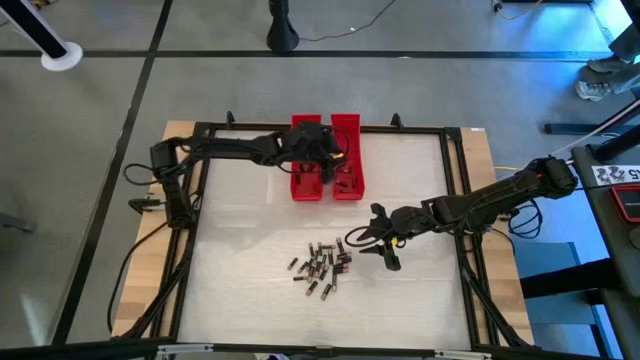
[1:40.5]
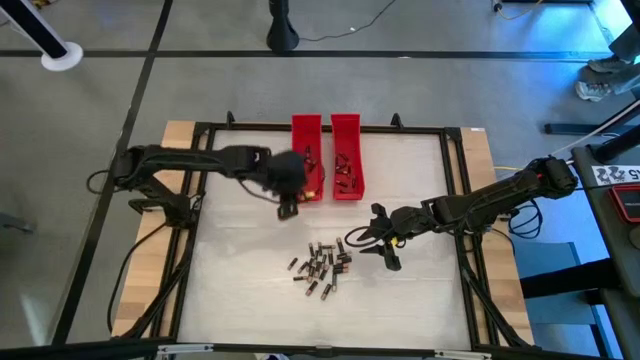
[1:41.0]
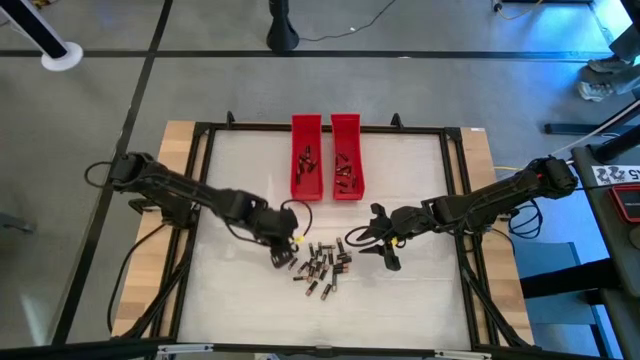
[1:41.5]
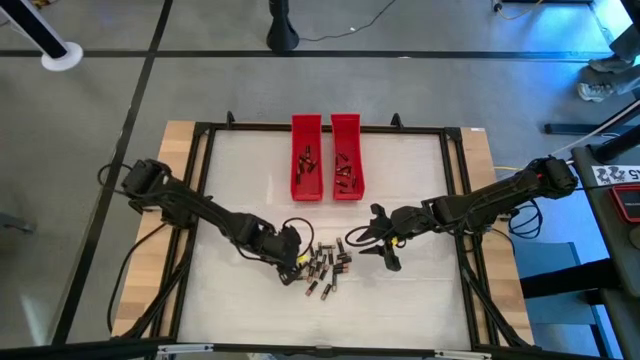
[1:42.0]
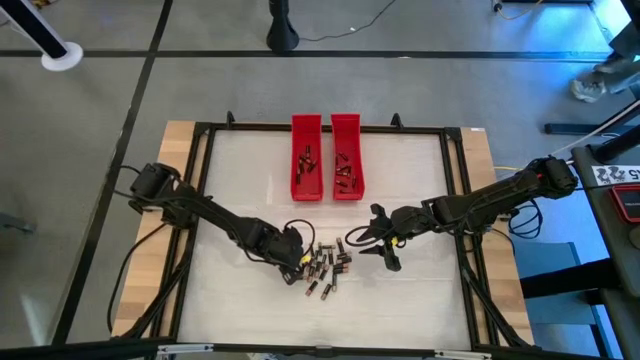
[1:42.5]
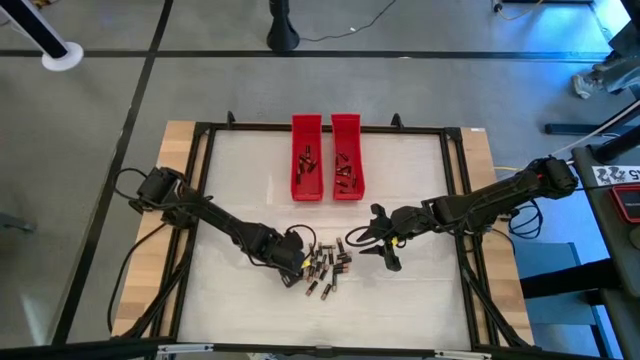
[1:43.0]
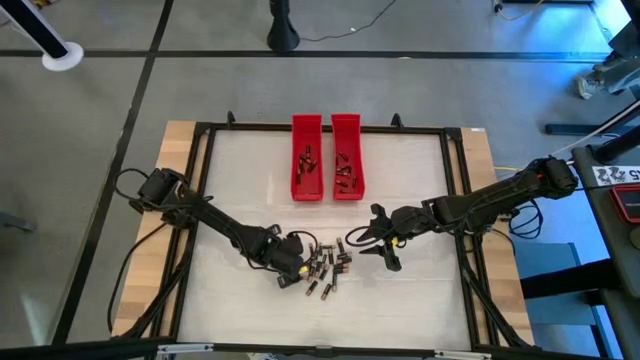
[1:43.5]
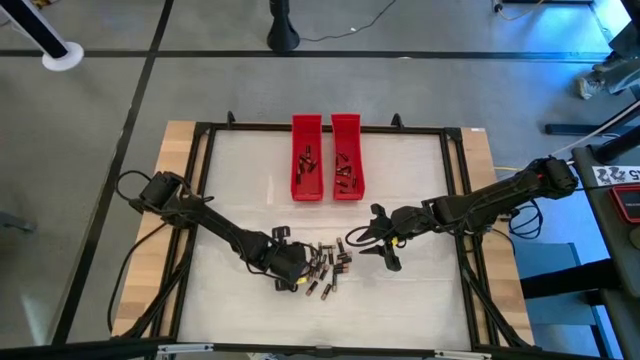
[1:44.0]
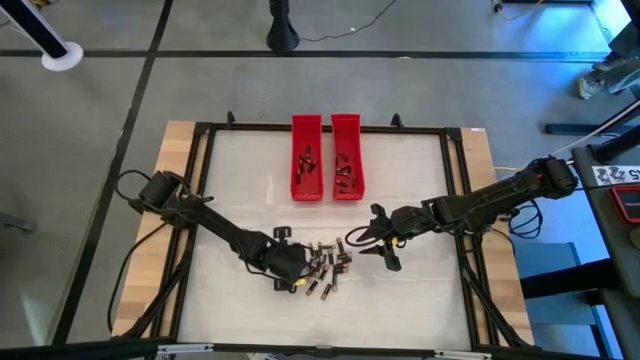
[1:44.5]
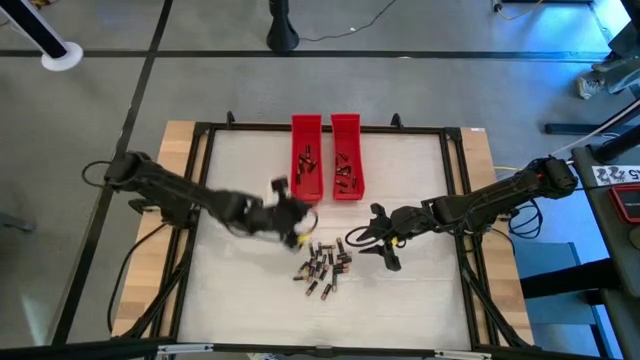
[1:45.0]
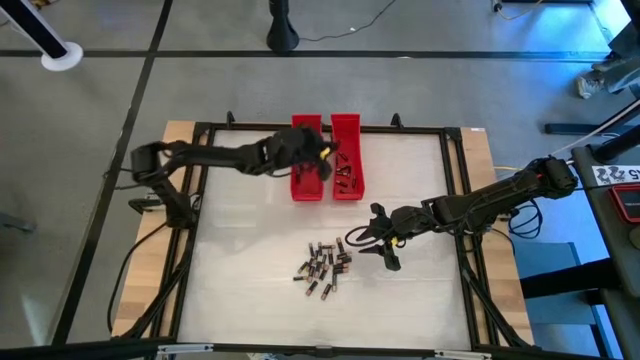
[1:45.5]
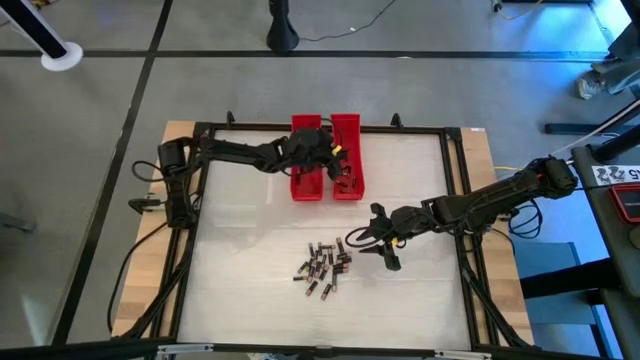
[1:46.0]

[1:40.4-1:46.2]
Task: Sort batteries
Put the small black battery into the right red bin

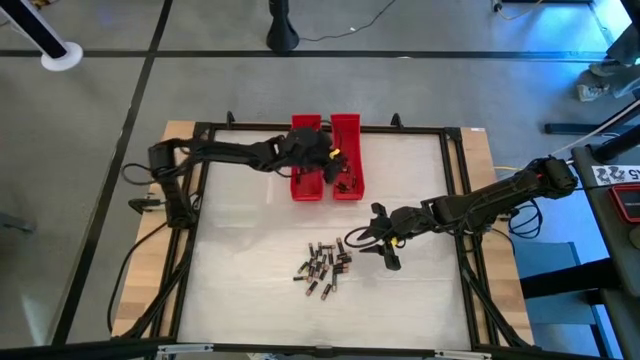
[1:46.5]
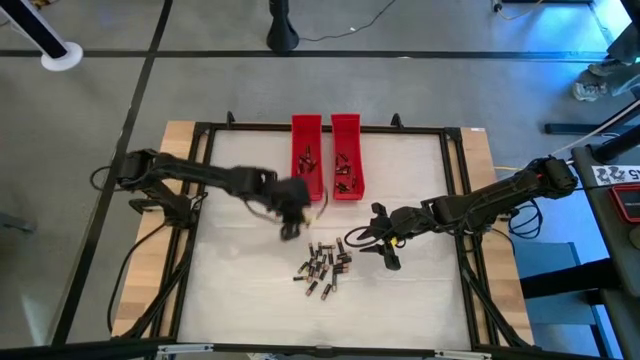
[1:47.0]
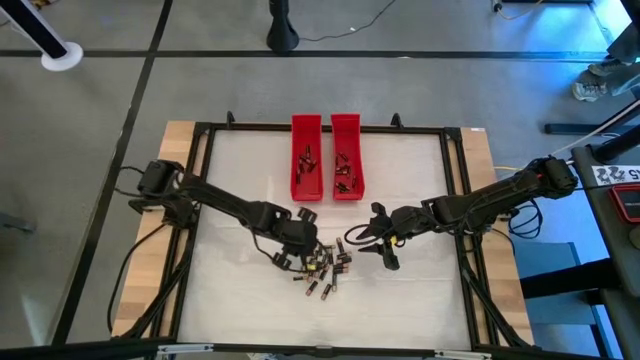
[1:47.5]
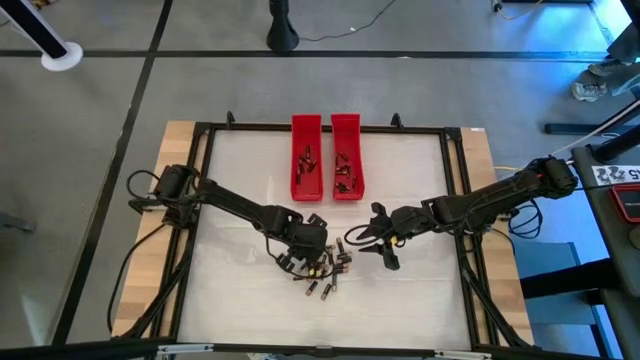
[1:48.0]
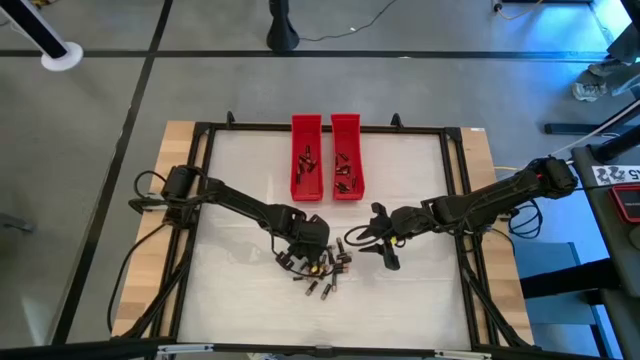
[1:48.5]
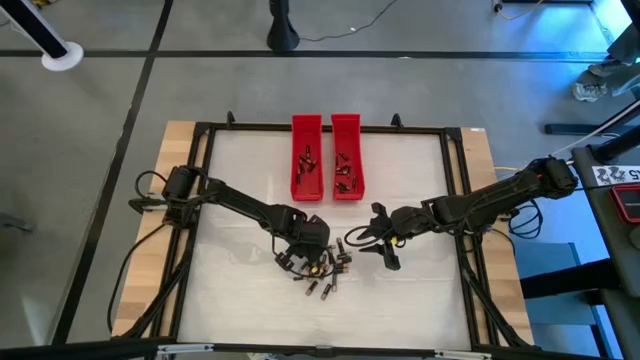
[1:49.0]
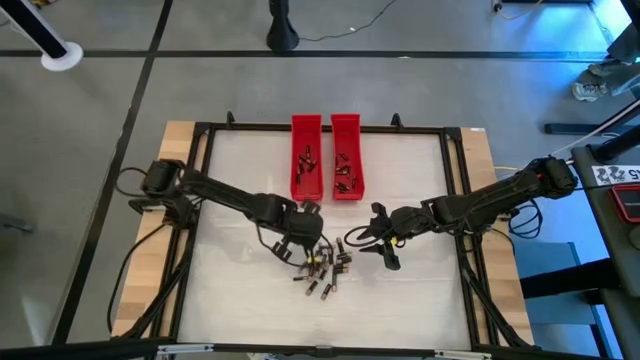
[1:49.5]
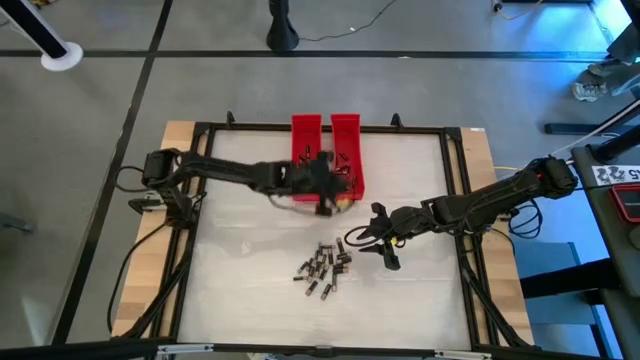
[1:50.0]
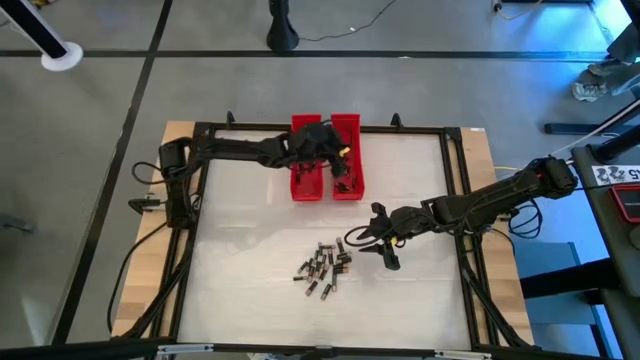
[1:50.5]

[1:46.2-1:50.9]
Put the small black battery into the right red bin

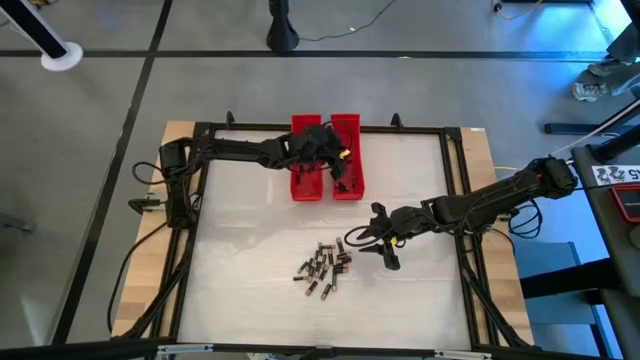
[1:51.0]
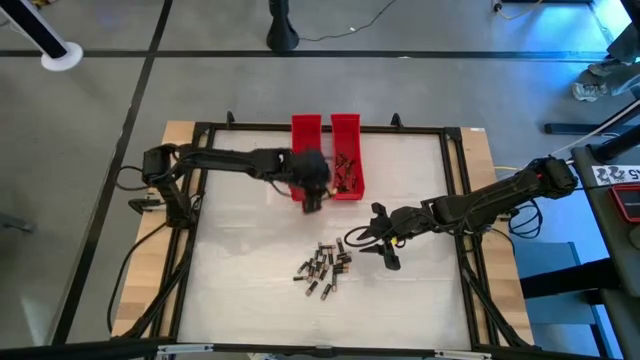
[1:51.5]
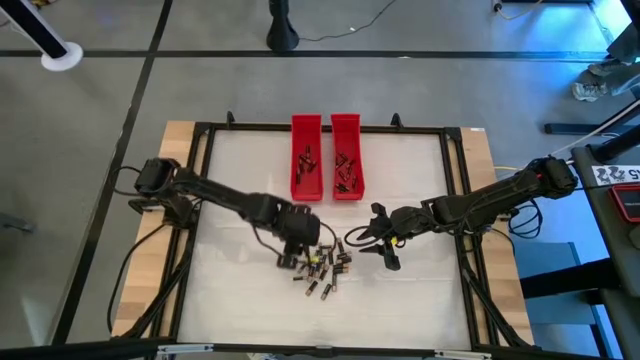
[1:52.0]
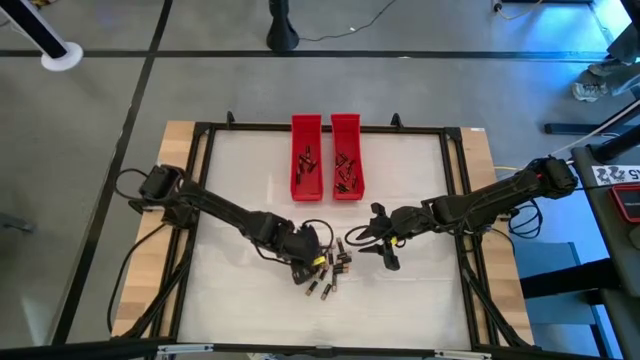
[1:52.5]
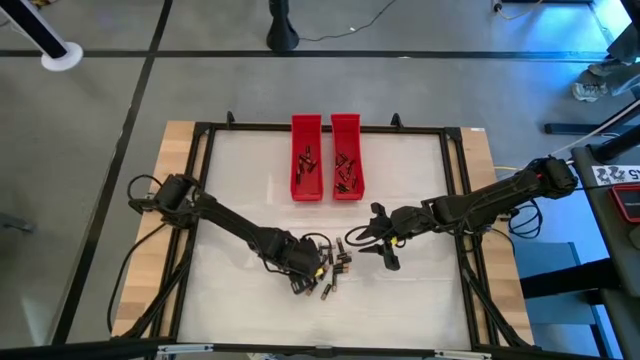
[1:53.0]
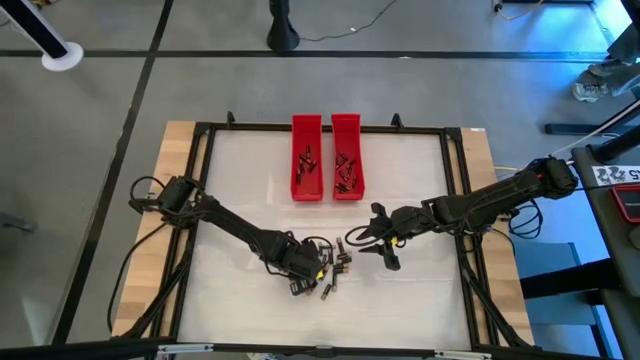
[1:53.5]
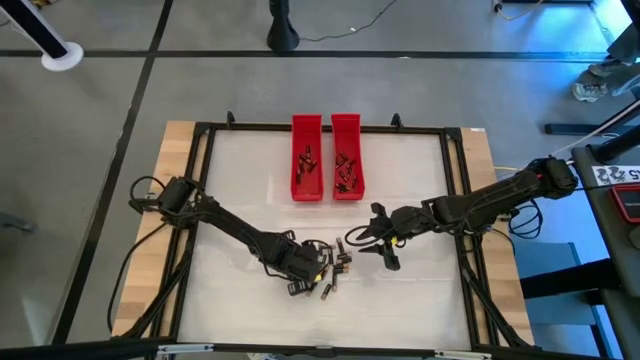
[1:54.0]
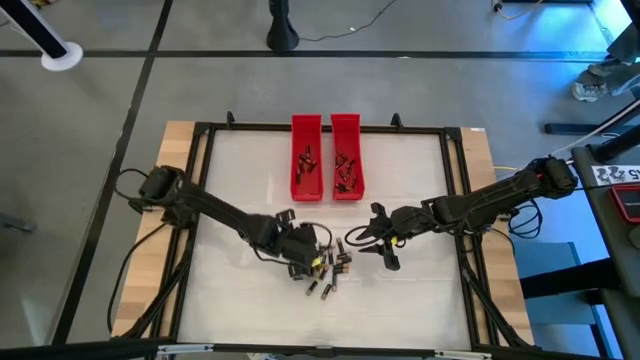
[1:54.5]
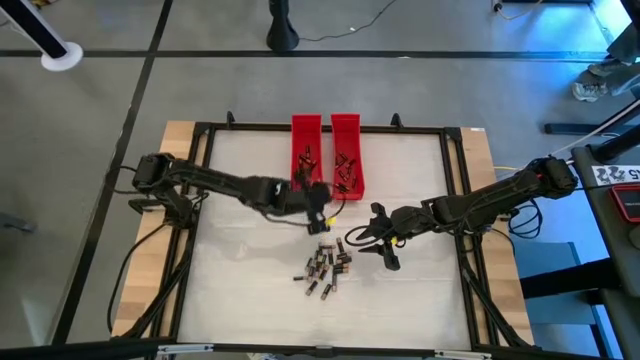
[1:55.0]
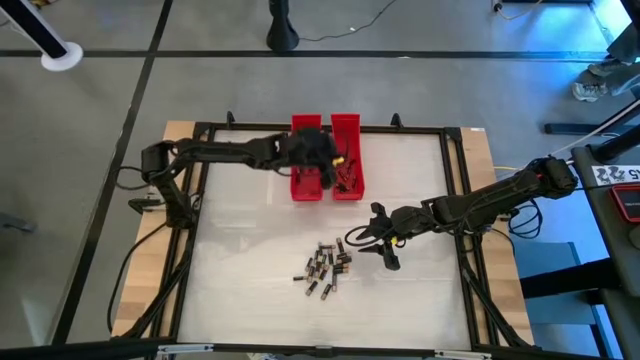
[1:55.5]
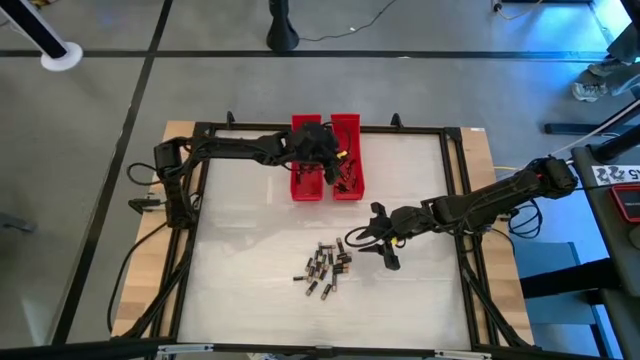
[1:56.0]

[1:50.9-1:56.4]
Put the small black battery into the right red bin

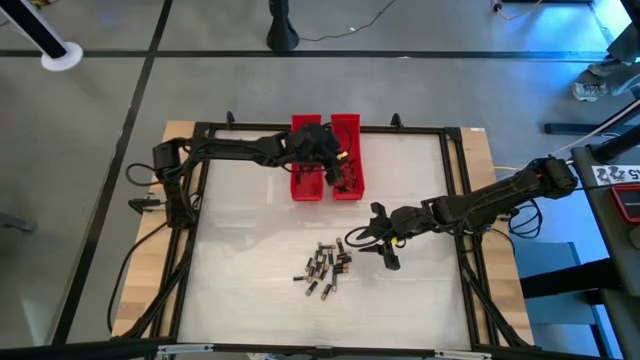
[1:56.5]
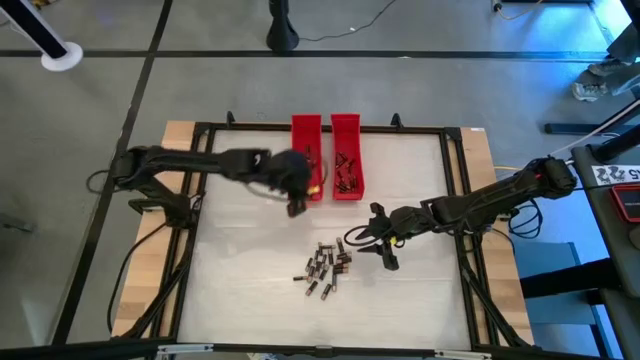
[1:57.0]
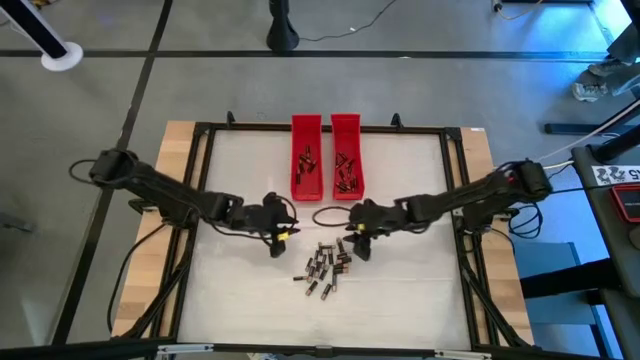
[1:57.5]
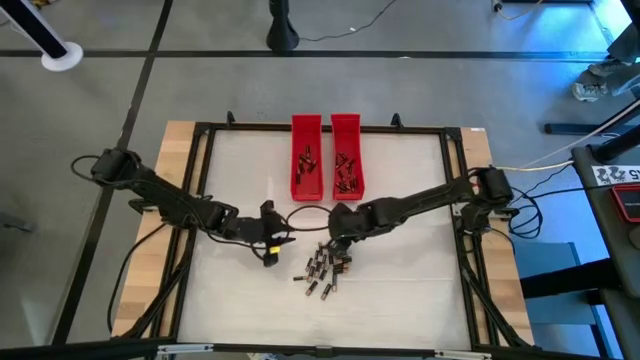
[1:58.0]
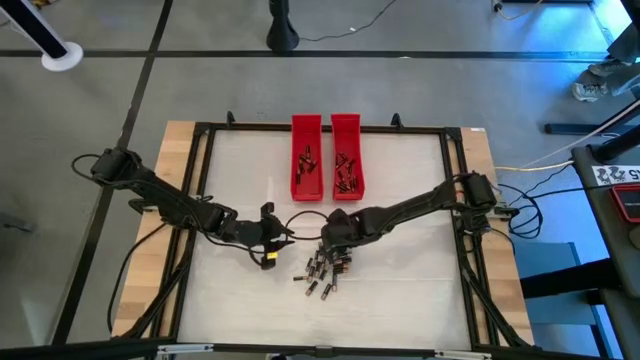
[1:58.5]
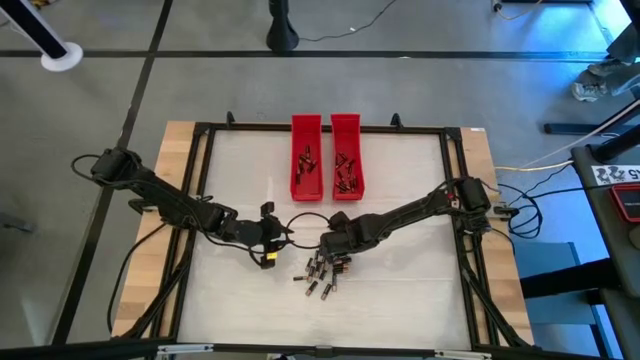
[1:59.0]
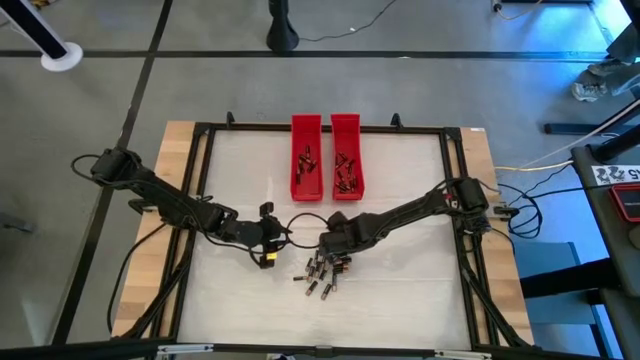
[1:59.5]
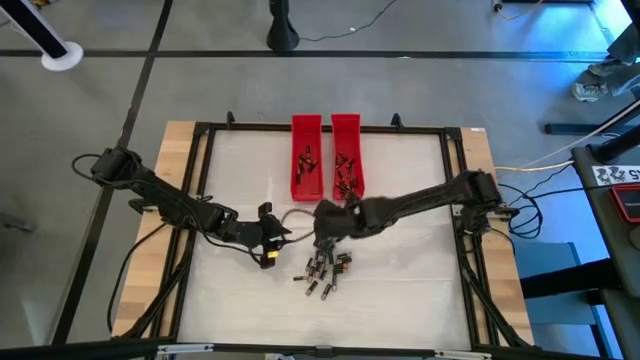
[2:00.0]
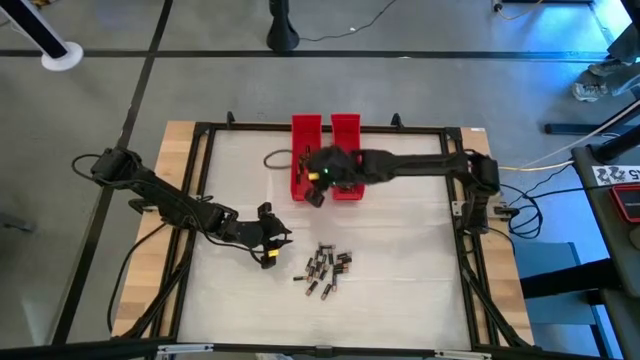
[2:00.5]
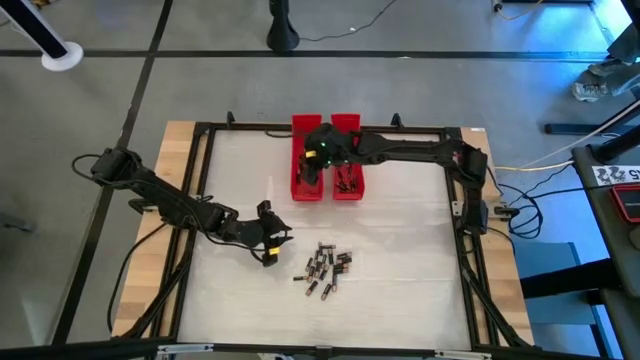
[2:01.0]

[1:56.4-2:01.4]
Put the large black battery into the left red bin
